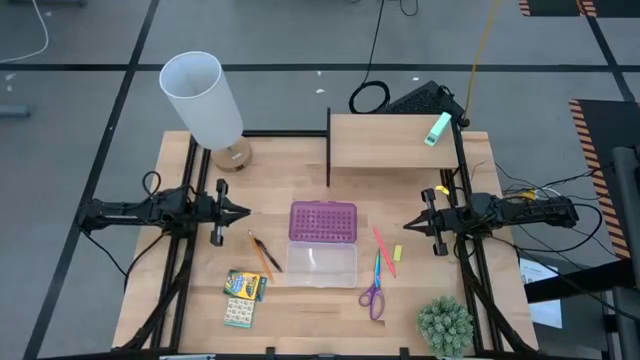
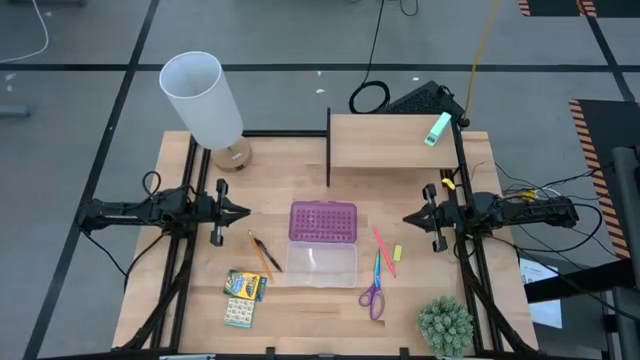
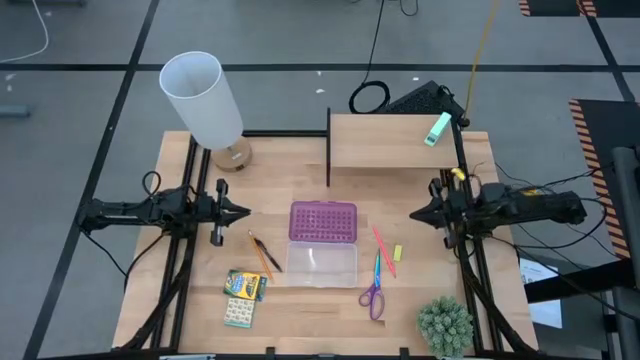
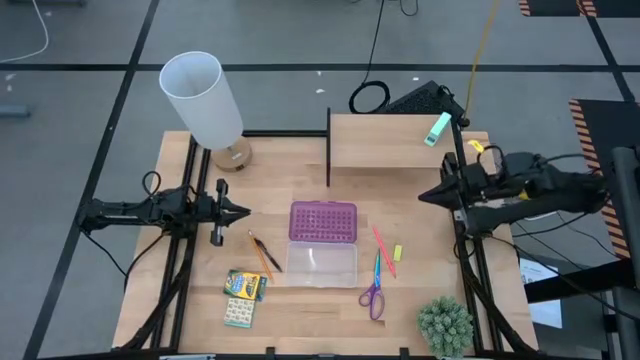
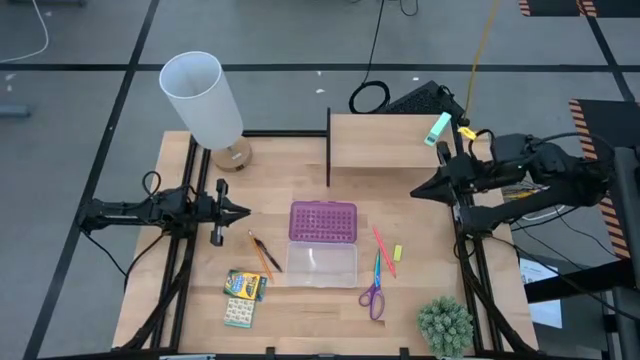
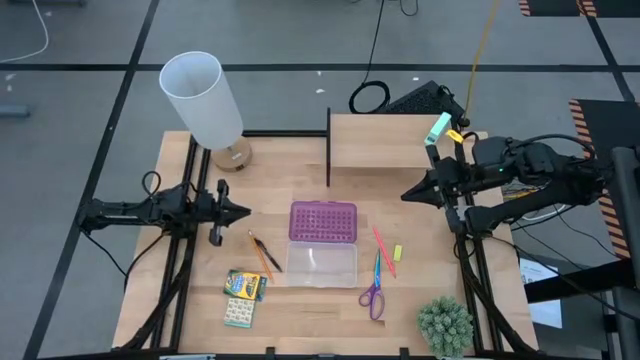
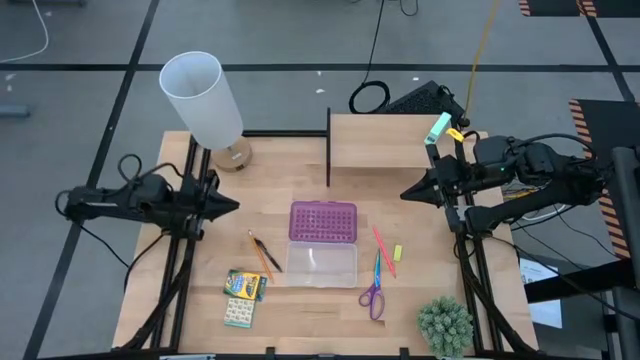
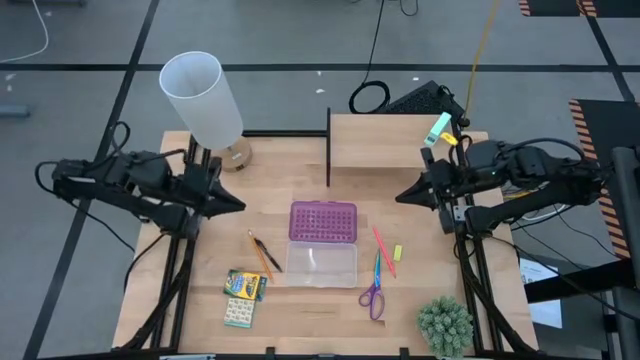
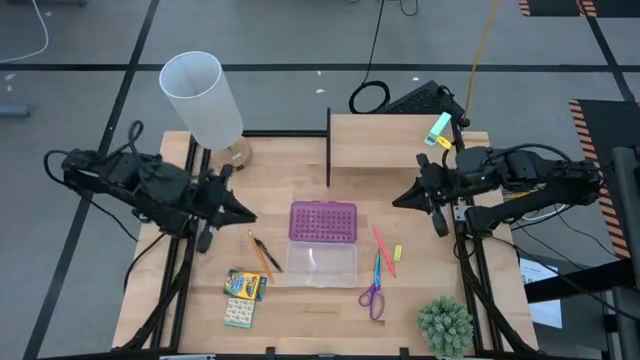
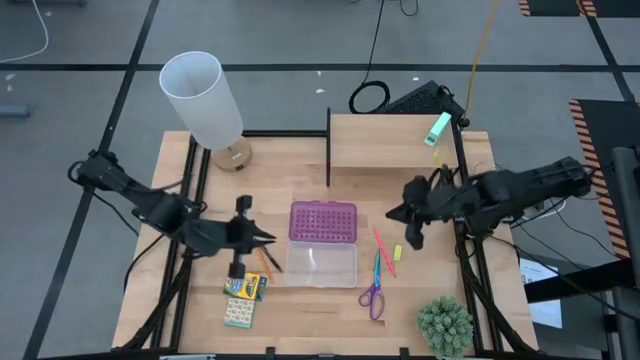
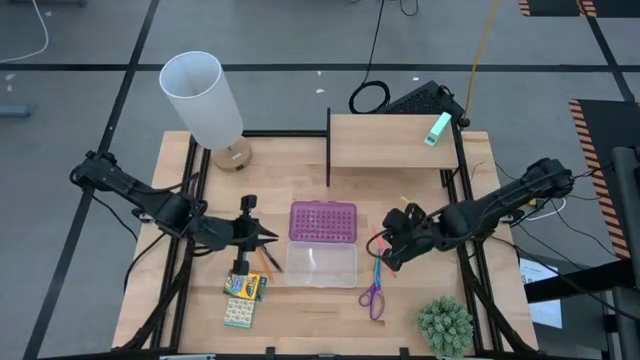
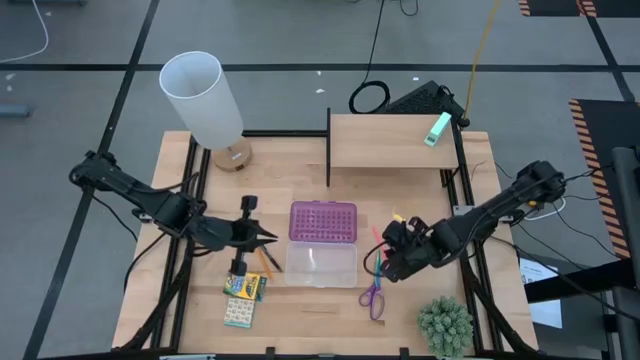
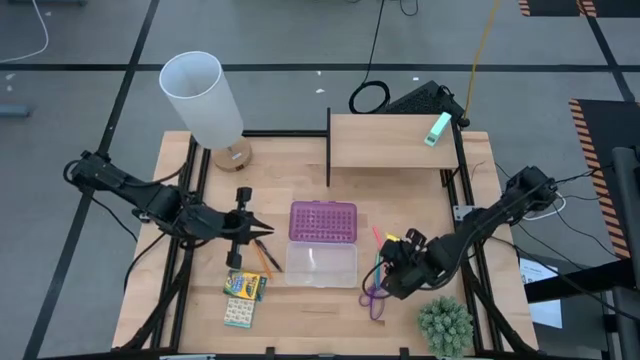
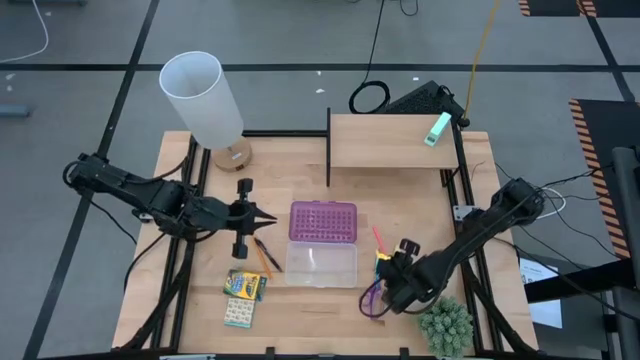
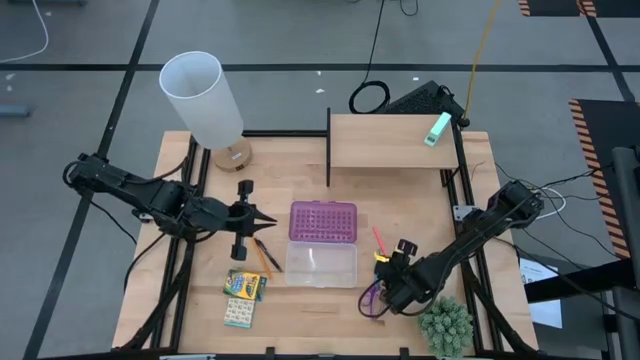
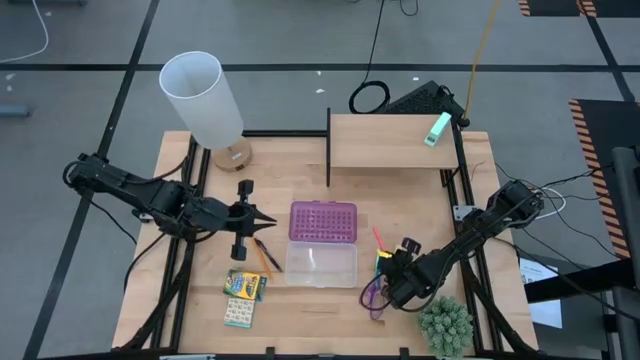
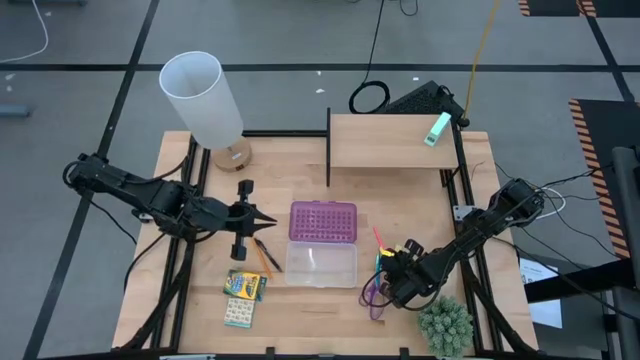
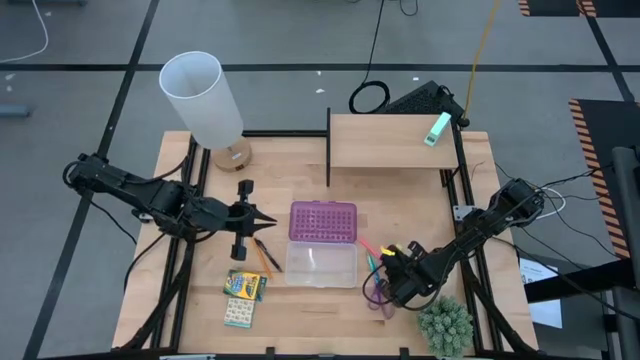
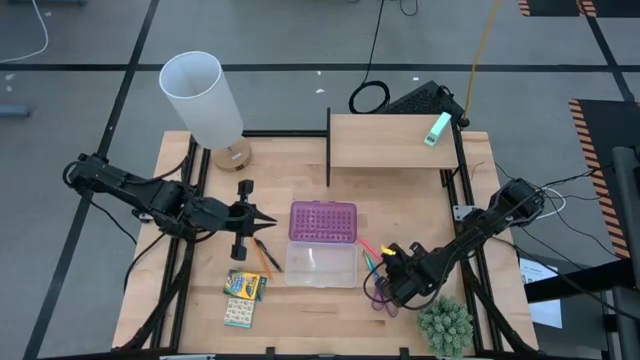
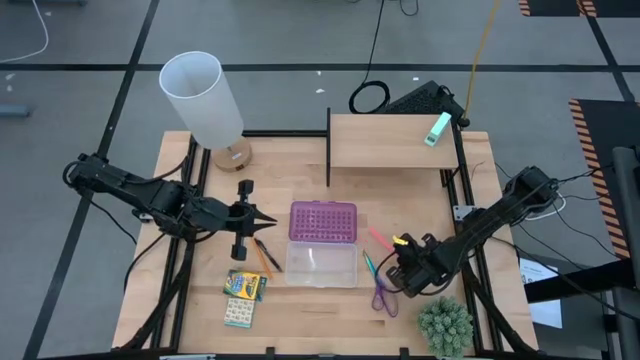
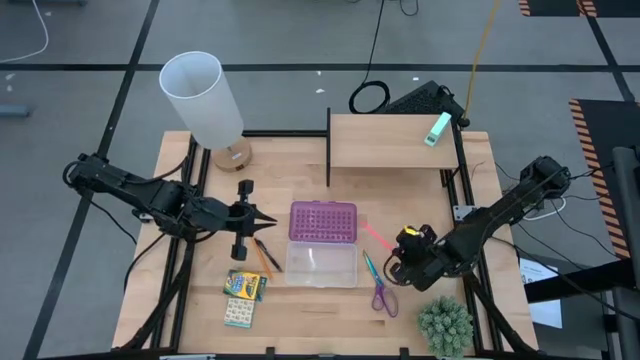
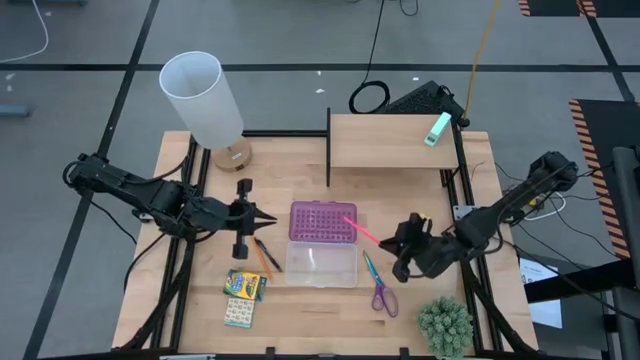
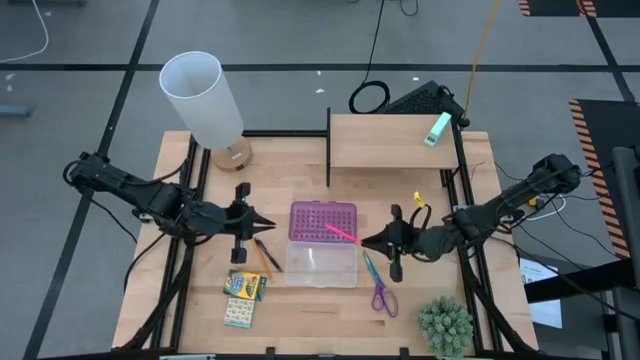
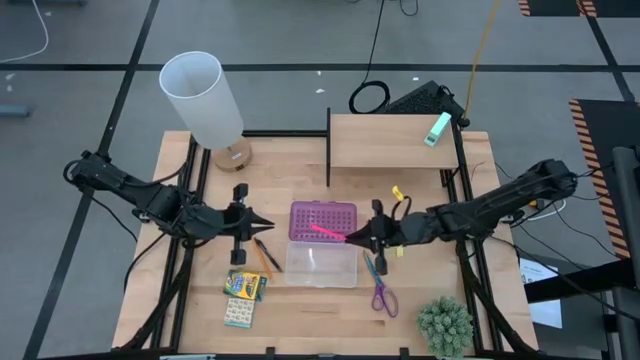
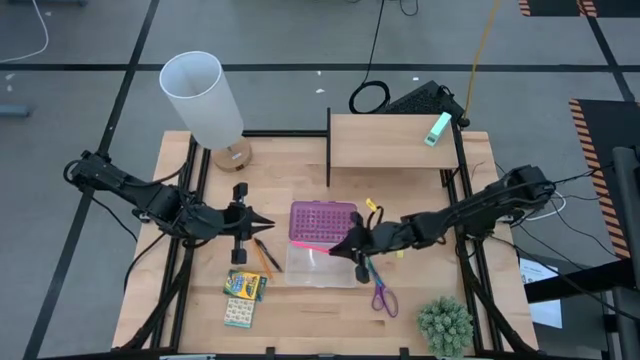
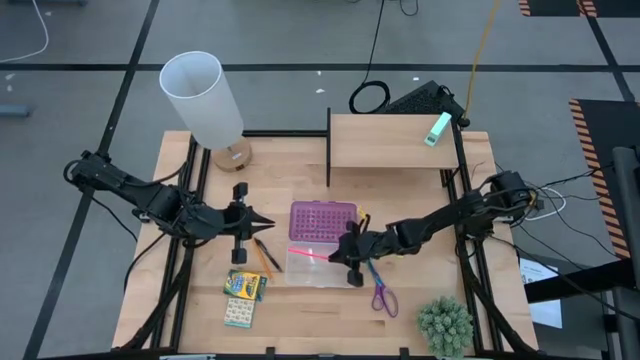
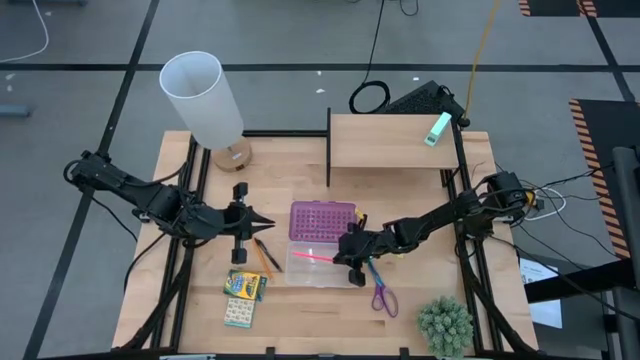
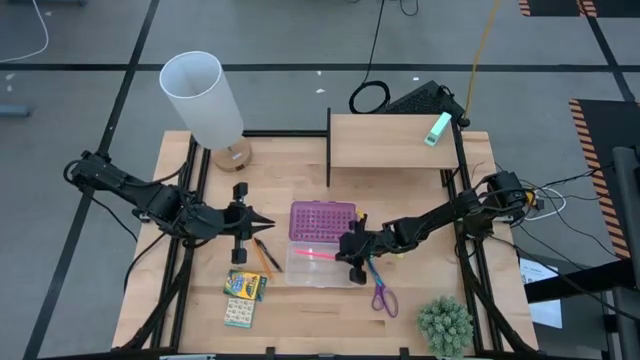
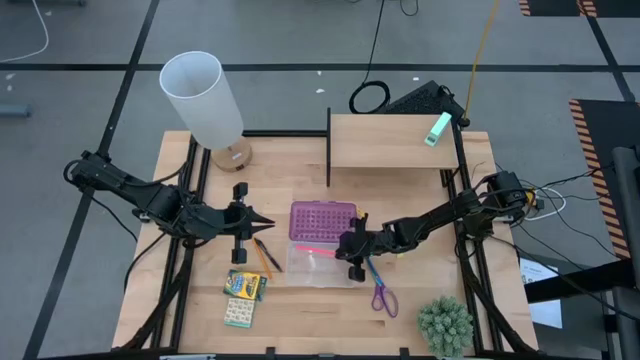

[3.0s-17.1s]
Task: Pack school essentials
Put the pink pencil into the violet plastic pencil case

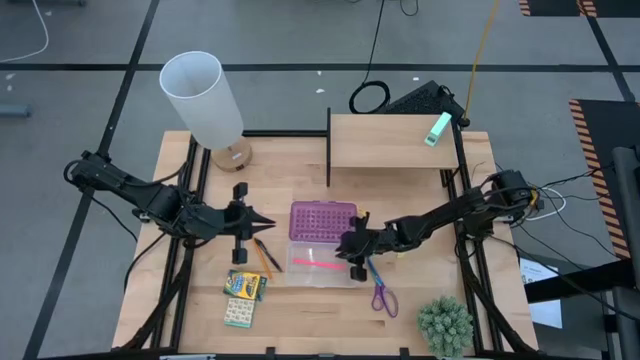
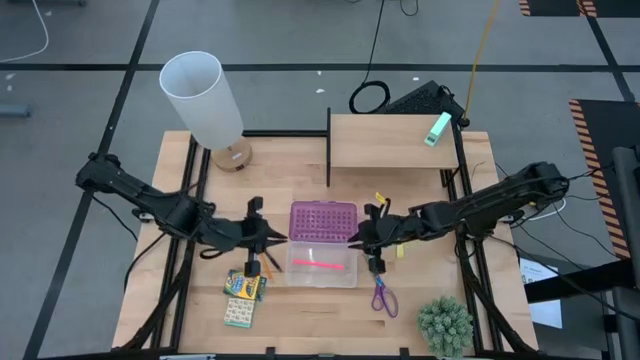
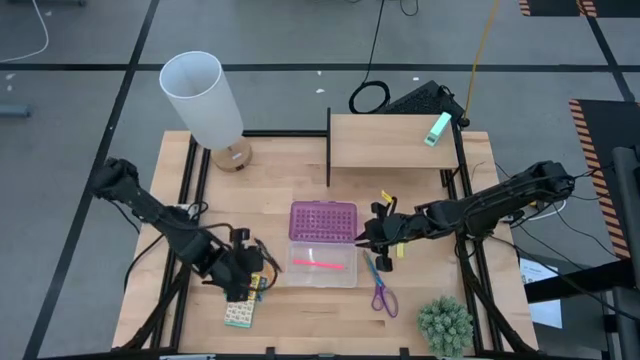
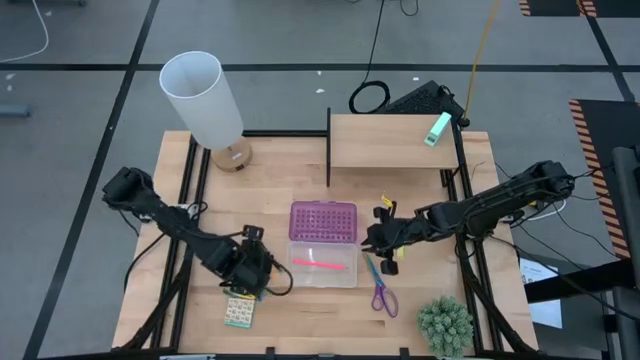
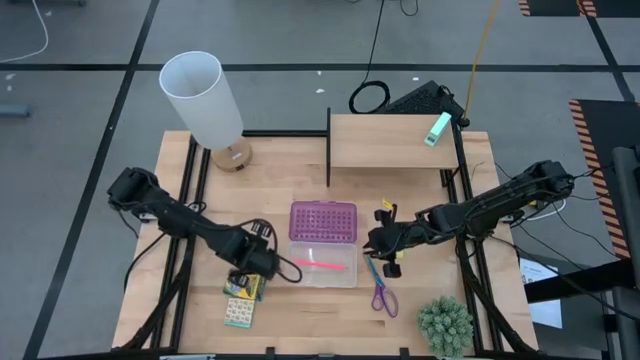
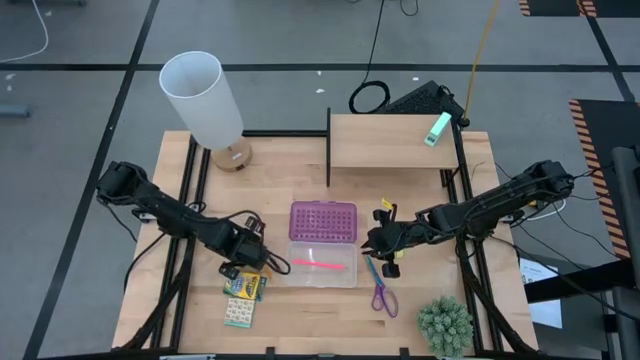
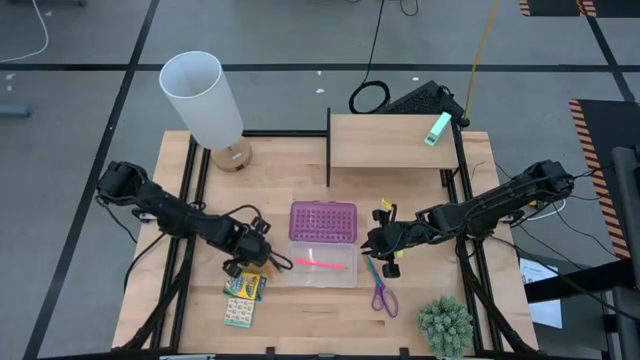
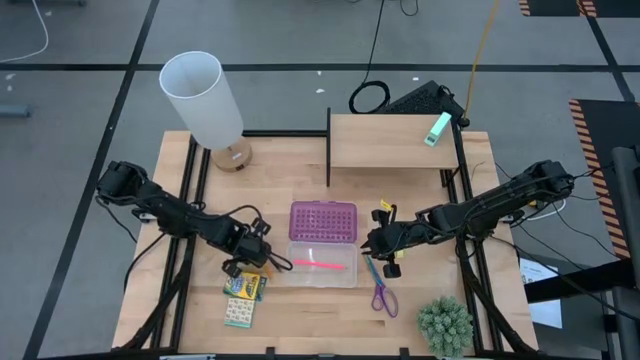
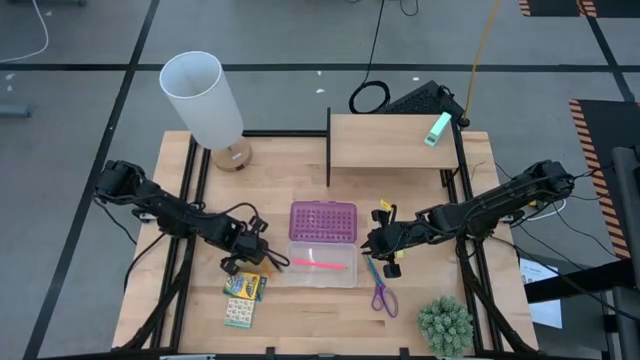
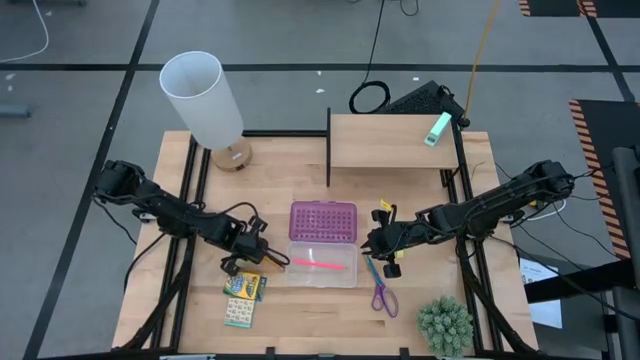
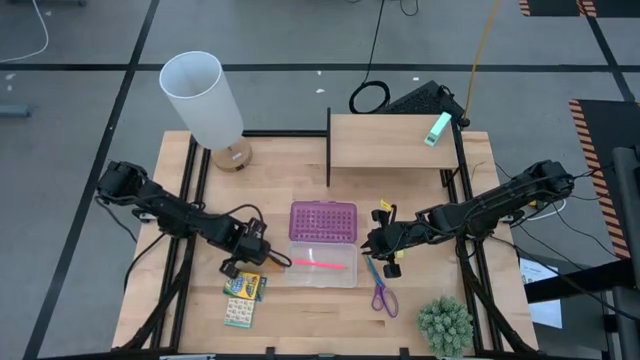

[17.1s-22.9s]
Put the yellow pencil into the violet plastic pencil case
